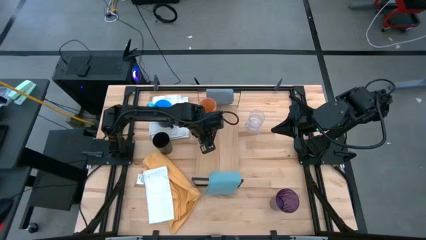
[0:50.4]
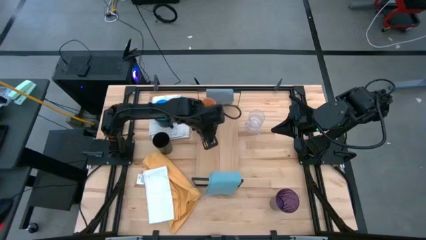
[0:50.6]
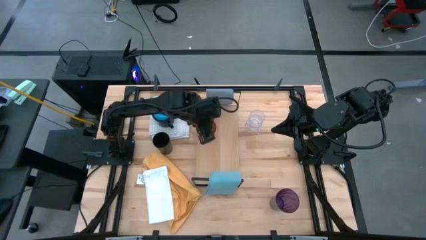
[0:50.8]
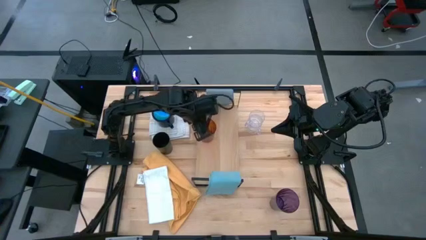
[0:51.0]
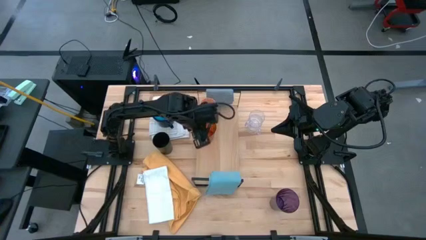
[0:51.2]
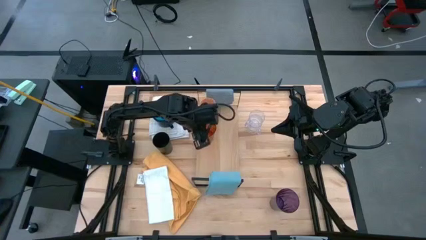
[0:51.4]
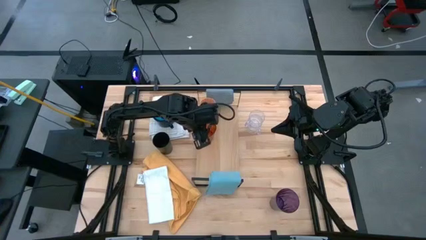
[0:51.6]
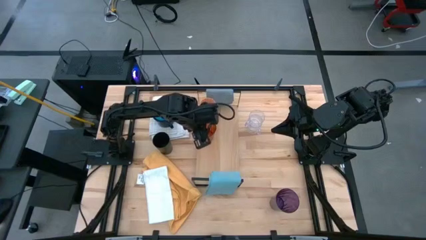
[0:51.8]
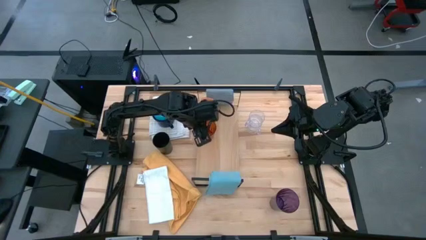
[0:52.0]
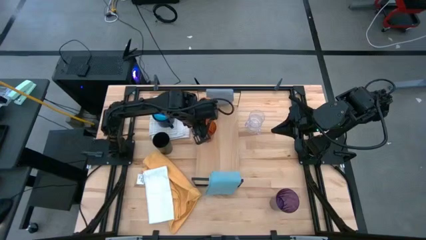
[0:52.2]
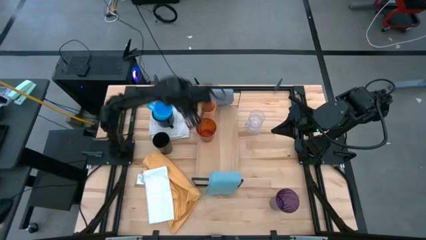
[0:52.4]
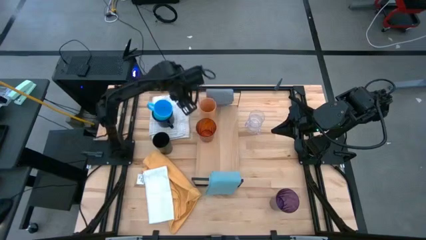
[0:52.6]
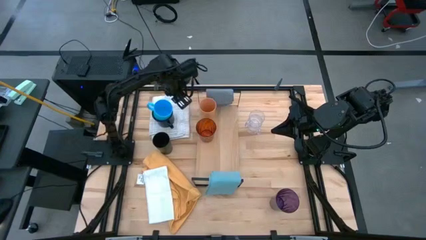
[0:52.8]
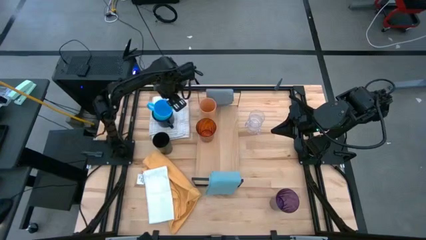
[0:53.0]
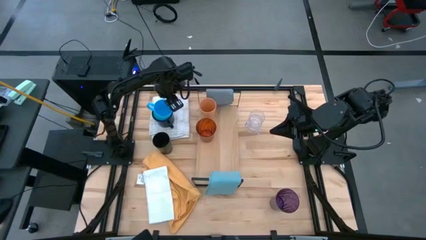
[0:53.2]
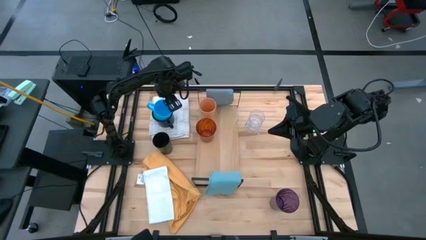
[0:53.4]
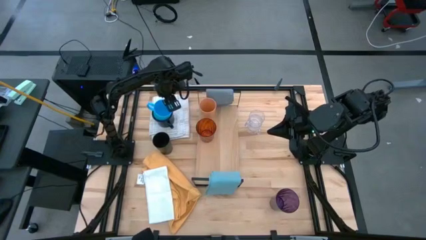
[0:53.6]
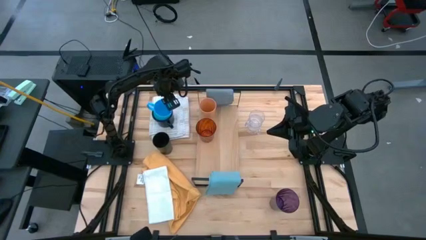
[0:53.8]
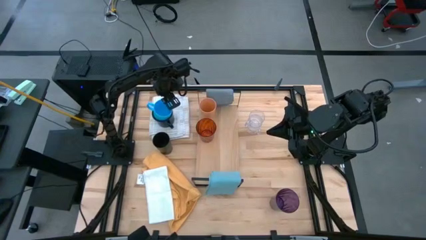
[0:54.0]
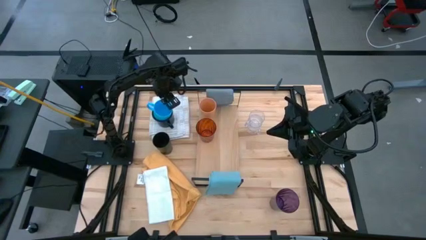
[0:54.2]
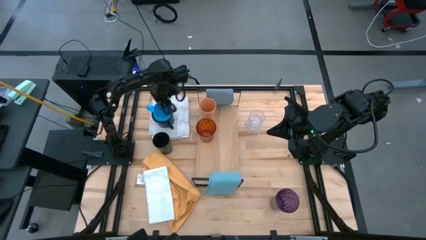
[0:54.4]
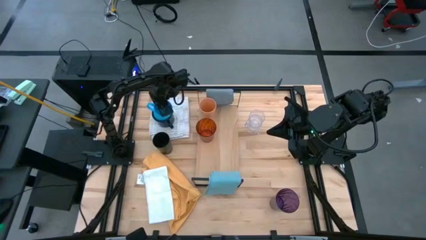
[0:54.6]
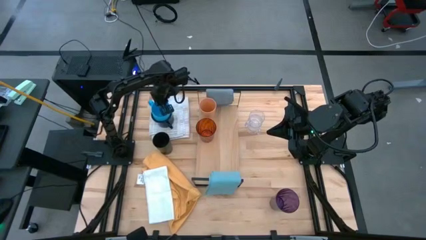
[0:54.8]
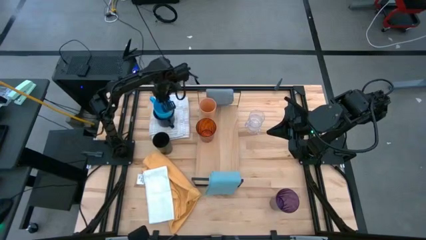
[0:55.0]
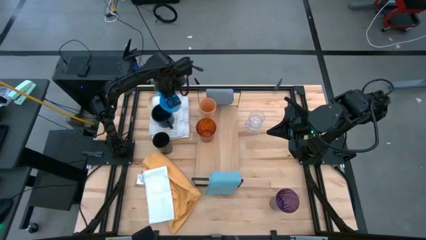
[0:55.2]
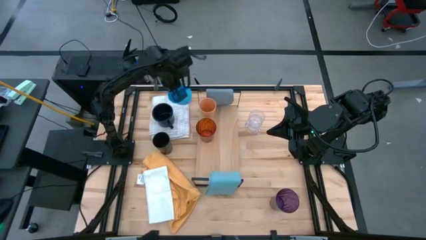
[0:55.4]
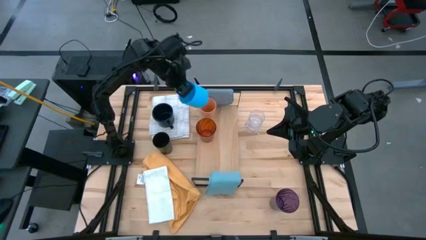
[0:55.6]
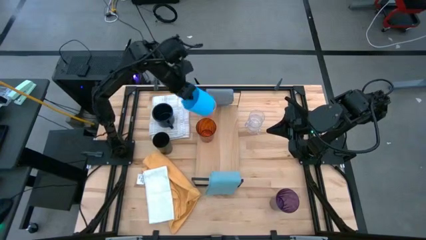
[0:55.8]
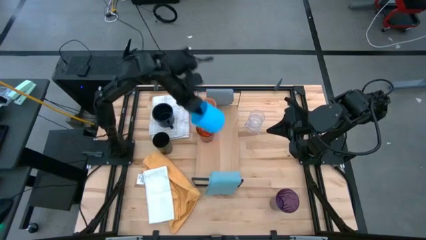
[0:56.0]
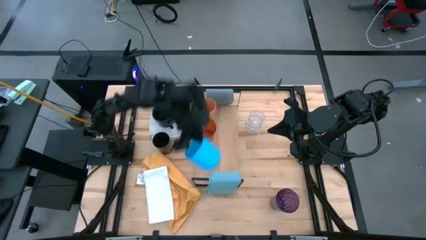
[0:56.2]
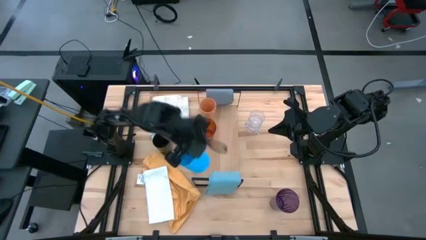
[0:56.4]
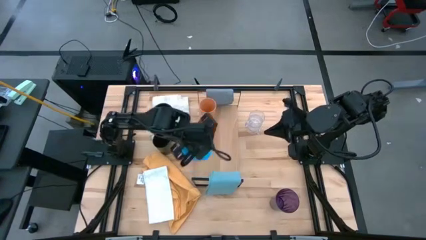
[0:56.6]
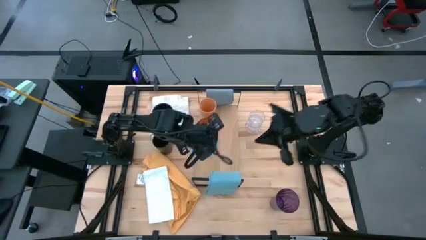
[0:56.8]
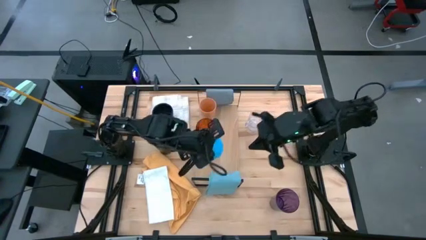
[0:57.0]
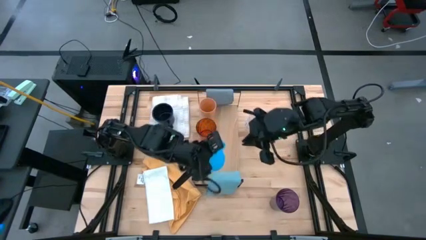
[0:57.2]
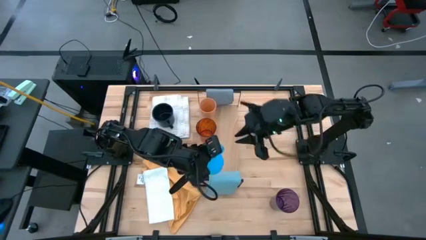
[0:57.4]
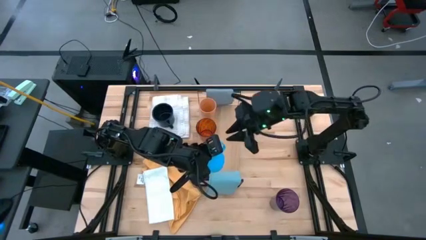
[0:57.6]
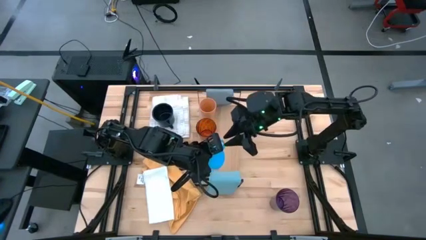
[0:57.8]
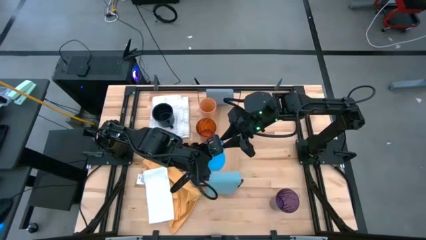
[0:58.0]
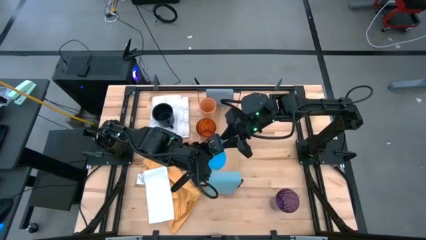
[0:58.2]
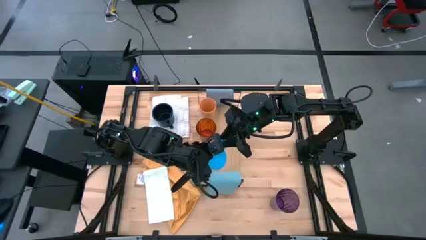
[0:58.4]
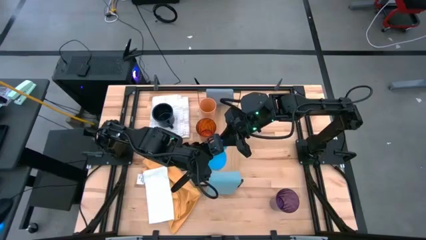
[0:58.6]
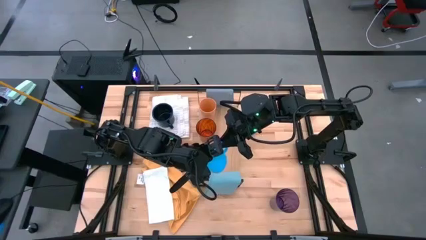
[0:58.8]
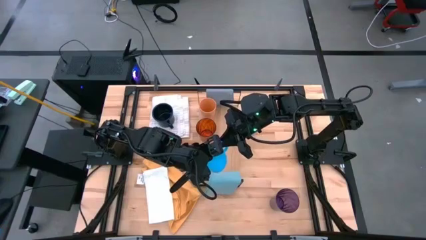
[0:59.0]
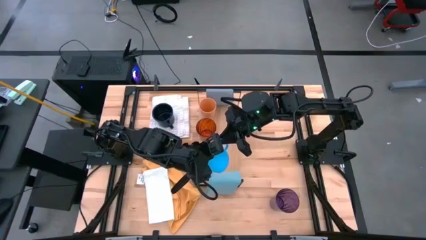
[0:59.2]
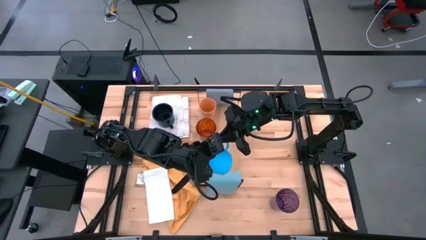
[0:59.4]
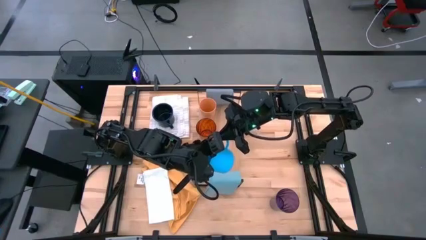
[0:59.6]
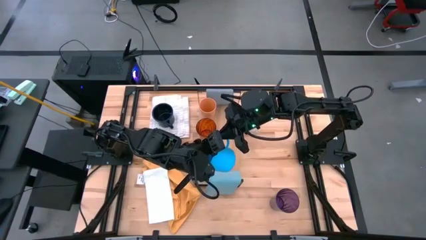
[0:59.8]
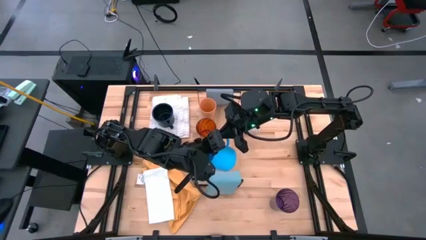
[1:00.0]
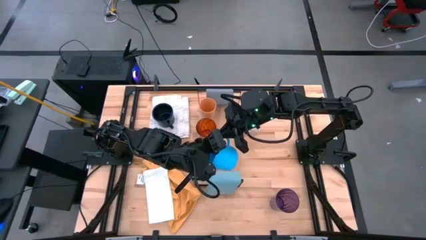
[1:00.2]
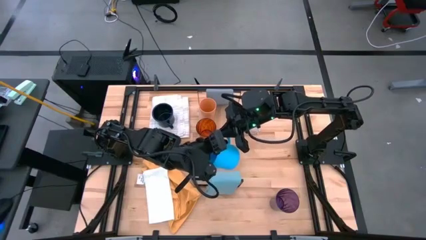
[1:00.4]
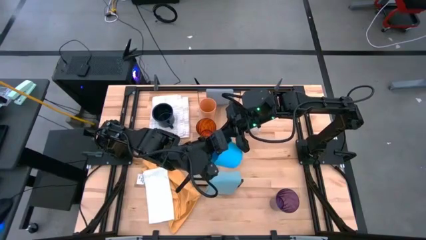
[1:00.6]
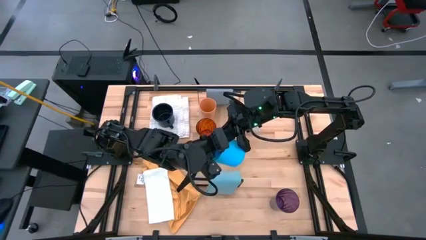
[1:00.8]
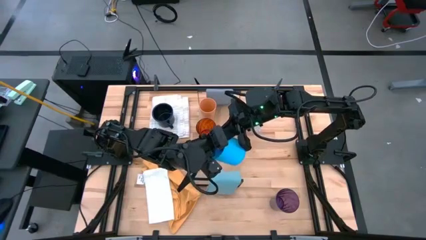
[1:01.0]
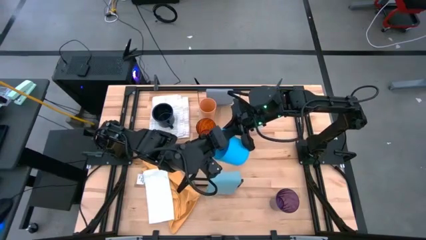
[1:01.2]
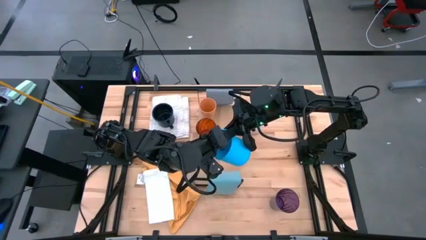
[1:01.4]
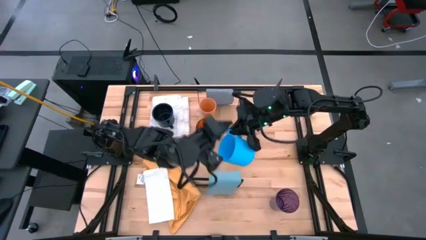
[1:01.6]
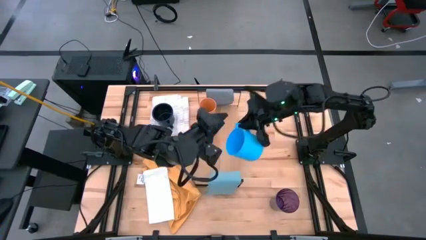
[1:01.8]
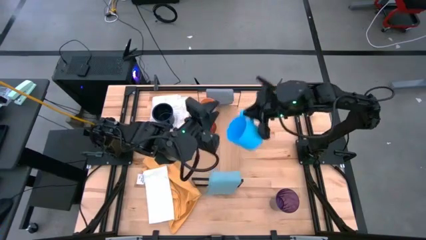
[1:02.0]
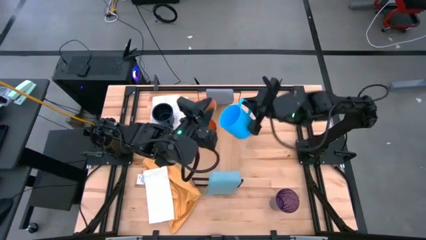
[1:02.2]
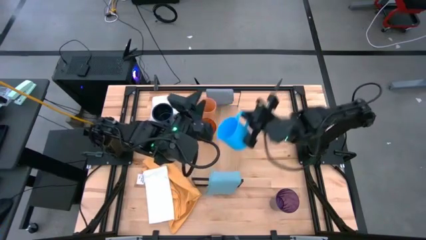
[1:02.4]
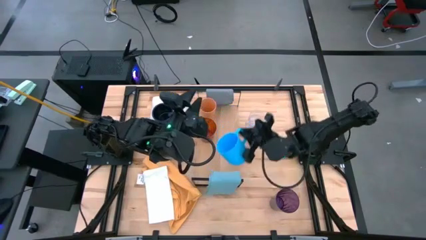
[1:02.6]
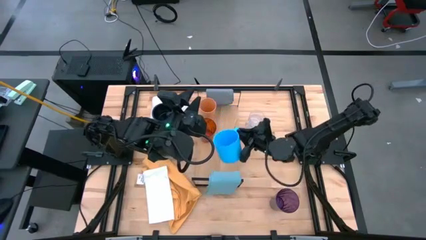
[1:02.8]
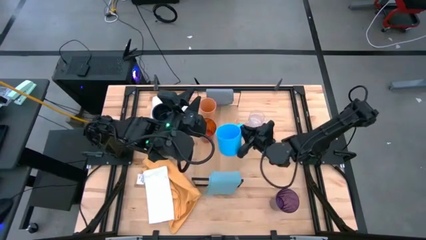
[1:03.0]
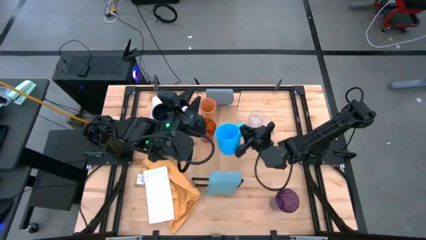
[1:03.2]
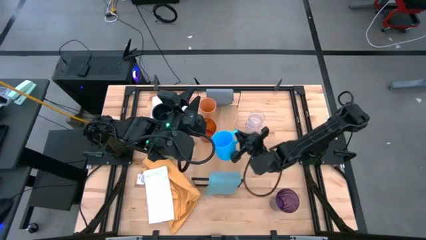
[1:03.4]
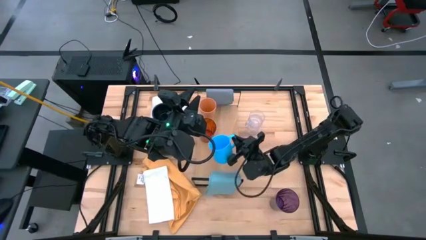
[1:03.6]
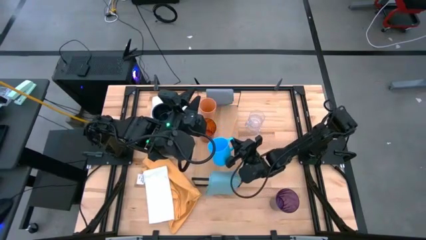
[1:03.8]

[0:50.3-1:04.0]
Task: Stack small to large cups/mugs on shelf
Put the light blue mug on the shelf
